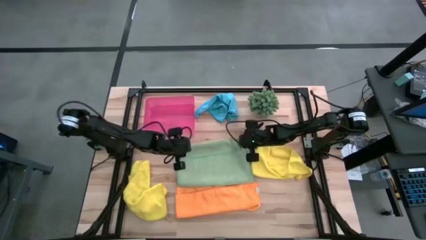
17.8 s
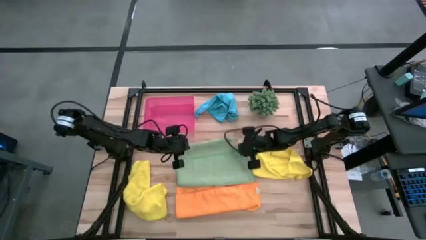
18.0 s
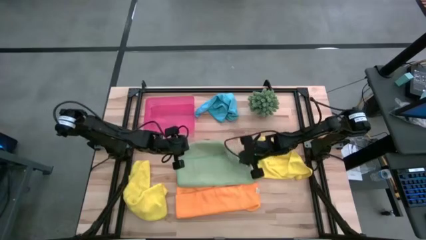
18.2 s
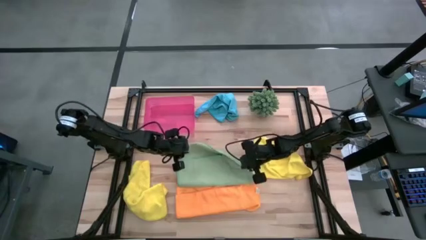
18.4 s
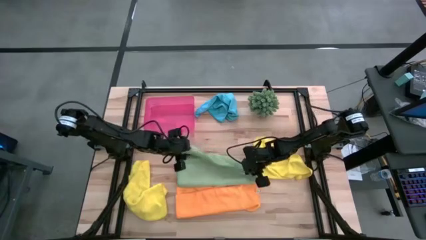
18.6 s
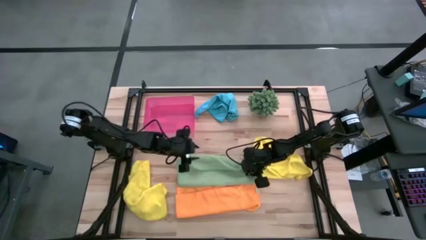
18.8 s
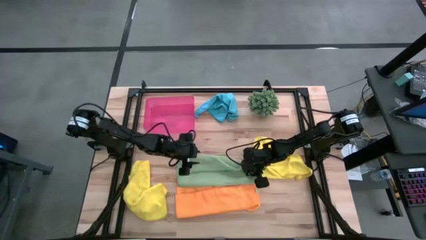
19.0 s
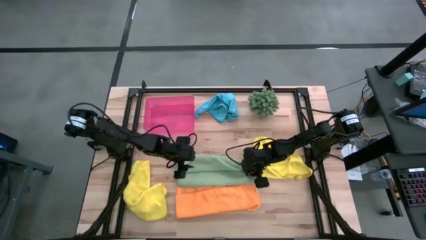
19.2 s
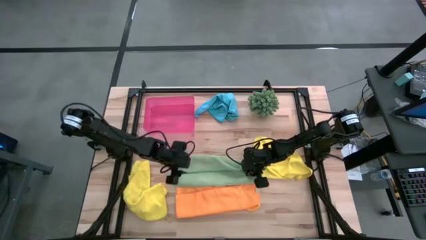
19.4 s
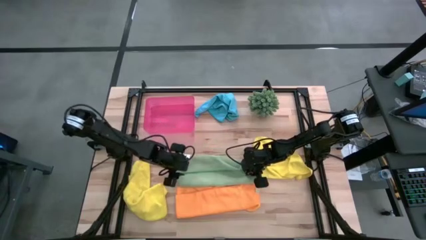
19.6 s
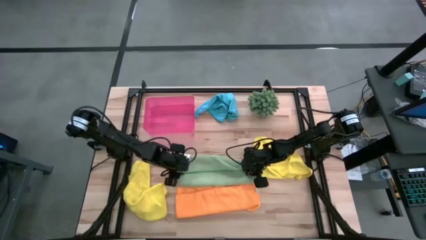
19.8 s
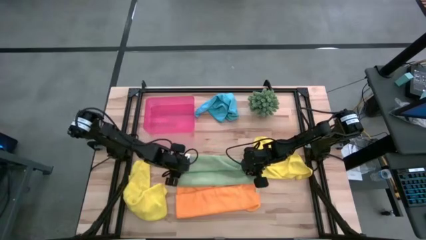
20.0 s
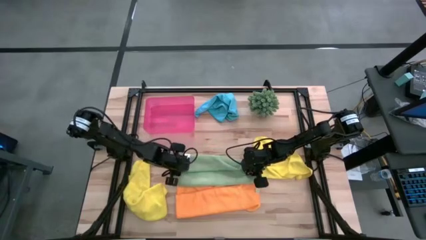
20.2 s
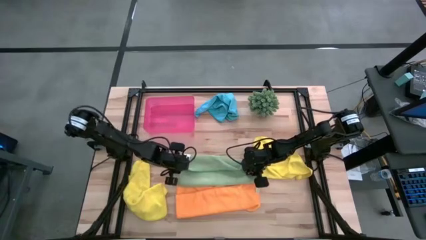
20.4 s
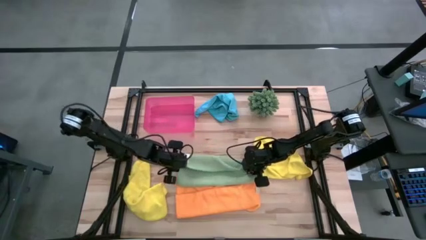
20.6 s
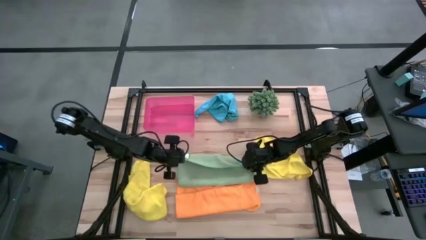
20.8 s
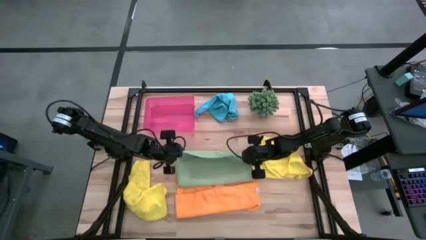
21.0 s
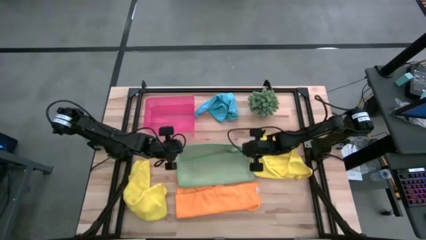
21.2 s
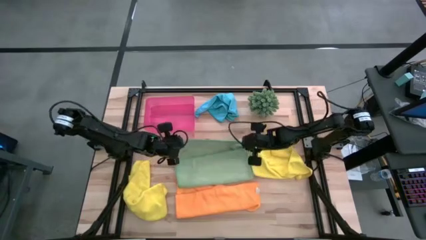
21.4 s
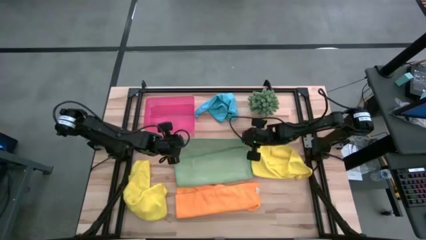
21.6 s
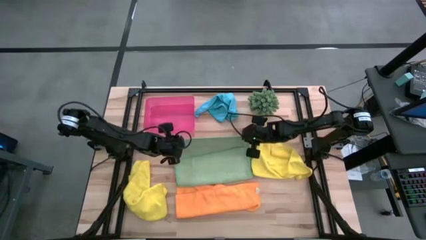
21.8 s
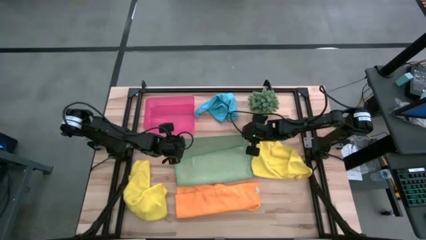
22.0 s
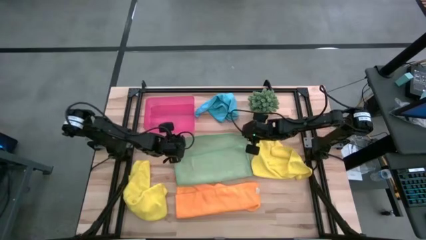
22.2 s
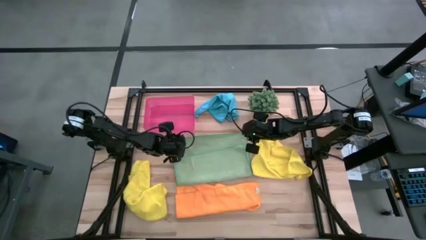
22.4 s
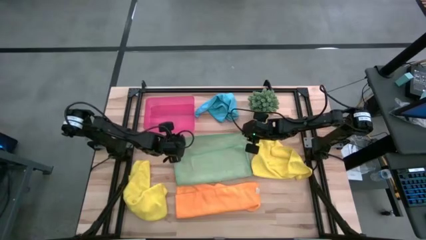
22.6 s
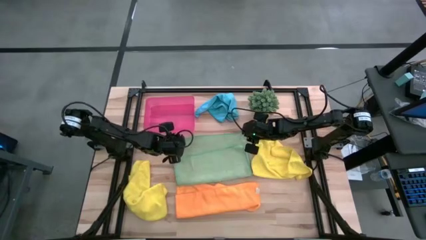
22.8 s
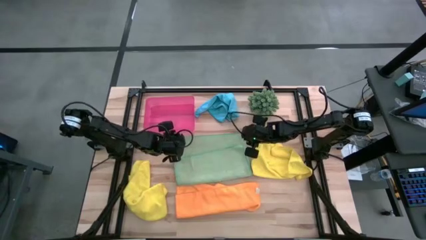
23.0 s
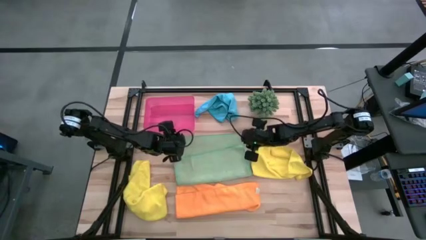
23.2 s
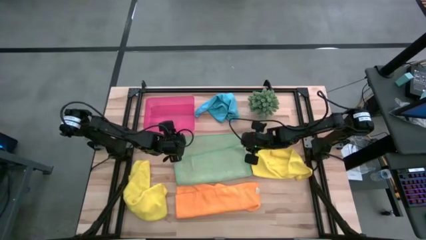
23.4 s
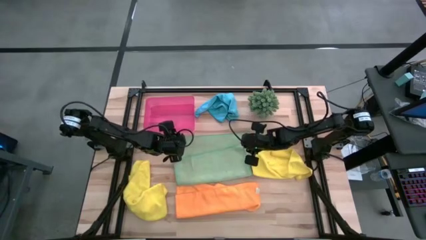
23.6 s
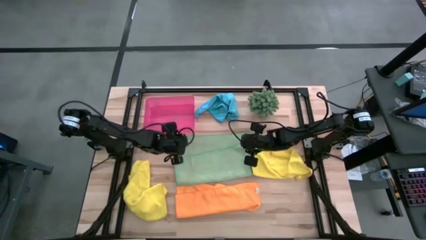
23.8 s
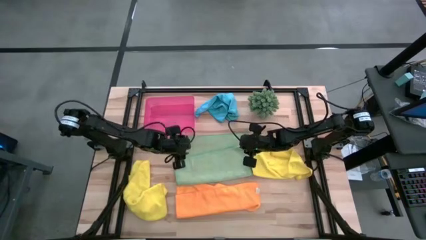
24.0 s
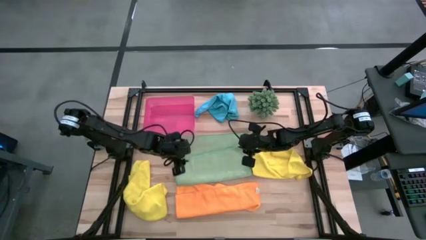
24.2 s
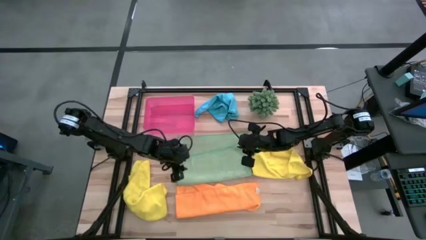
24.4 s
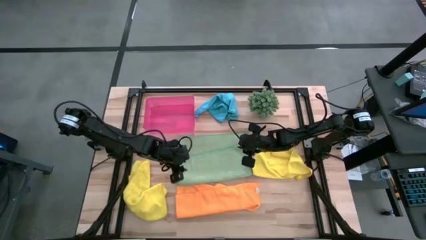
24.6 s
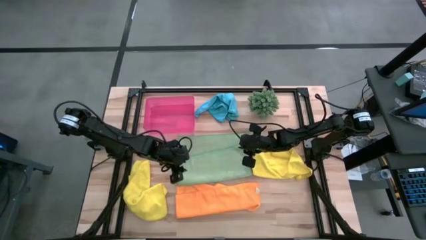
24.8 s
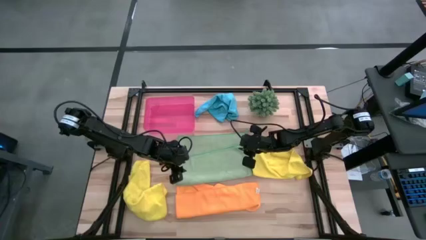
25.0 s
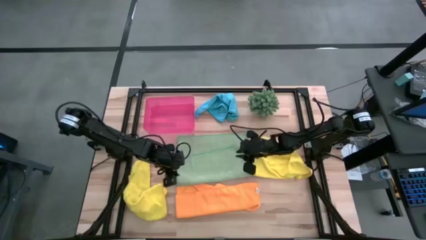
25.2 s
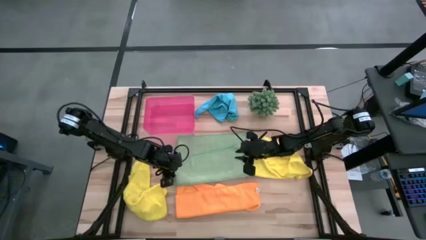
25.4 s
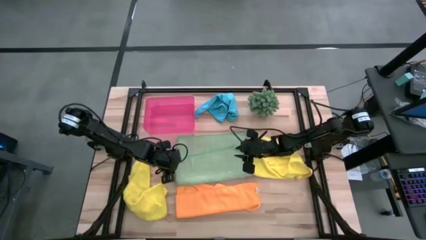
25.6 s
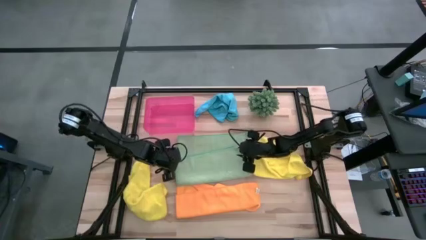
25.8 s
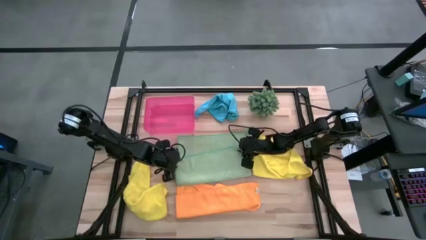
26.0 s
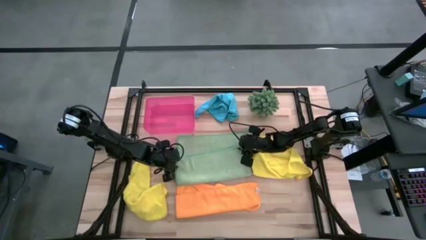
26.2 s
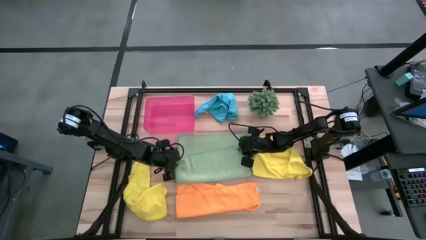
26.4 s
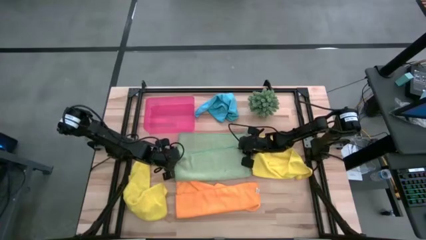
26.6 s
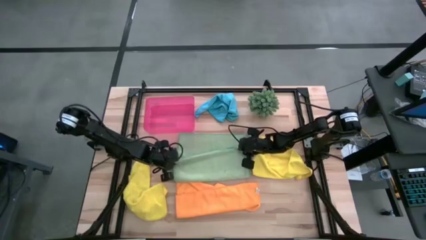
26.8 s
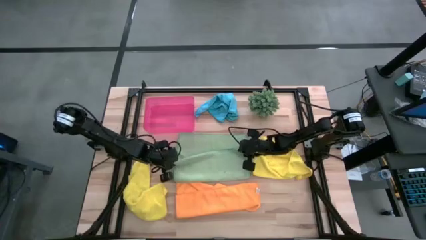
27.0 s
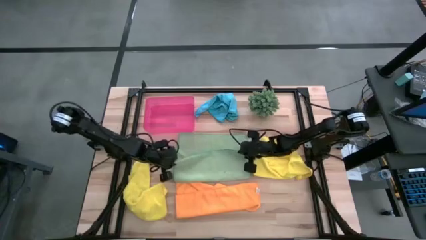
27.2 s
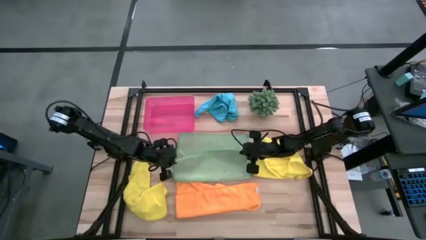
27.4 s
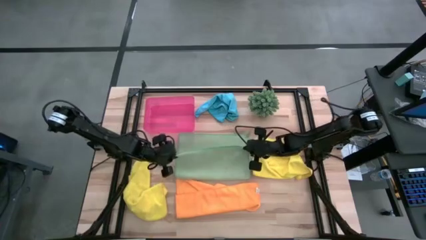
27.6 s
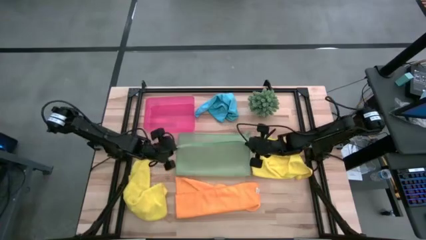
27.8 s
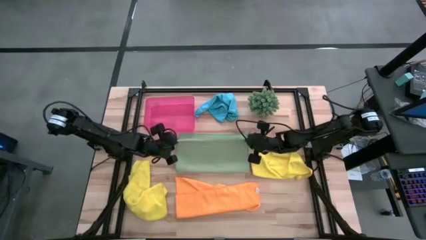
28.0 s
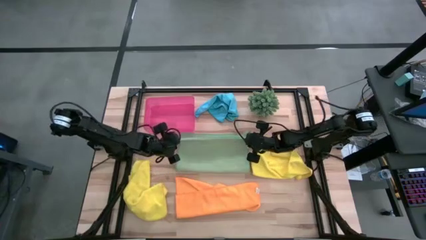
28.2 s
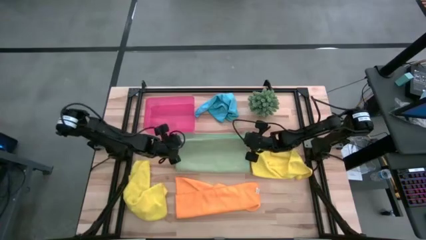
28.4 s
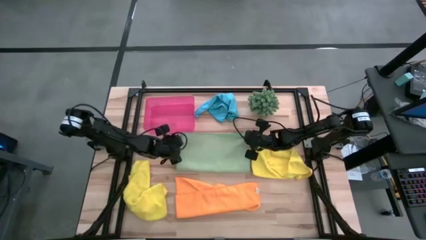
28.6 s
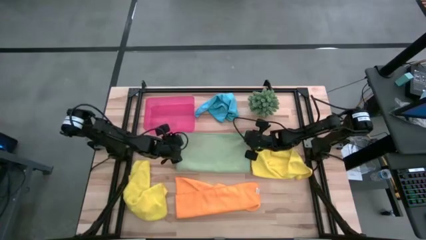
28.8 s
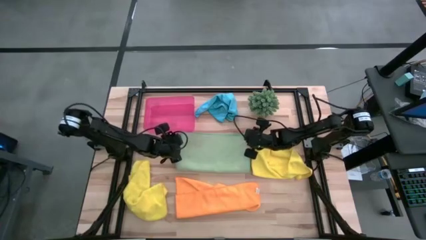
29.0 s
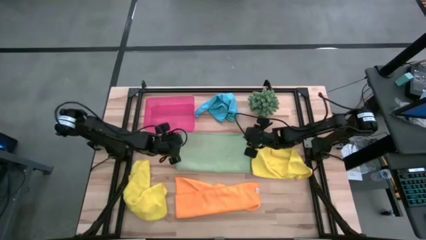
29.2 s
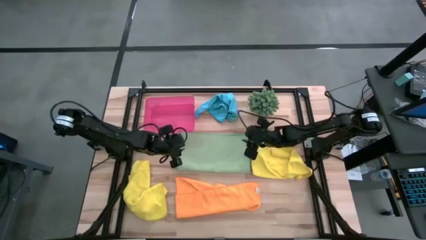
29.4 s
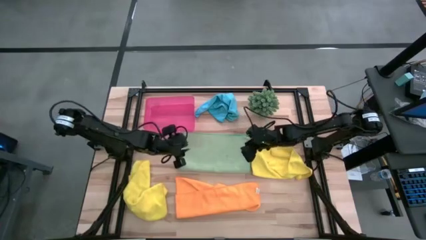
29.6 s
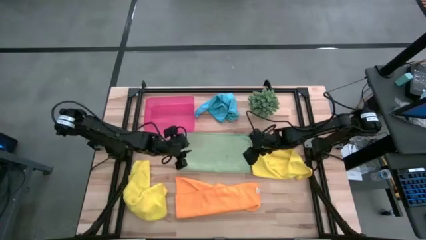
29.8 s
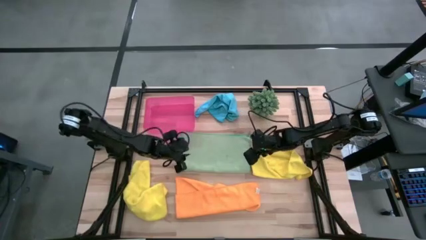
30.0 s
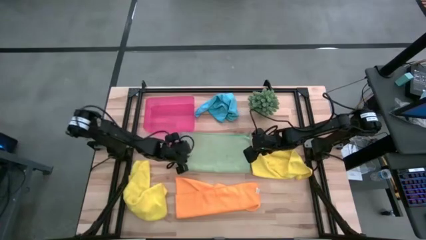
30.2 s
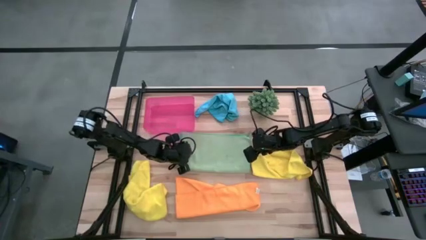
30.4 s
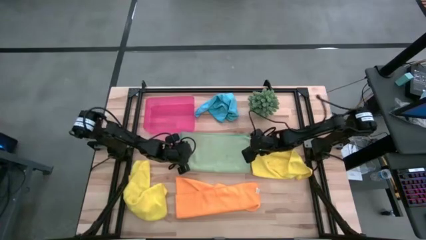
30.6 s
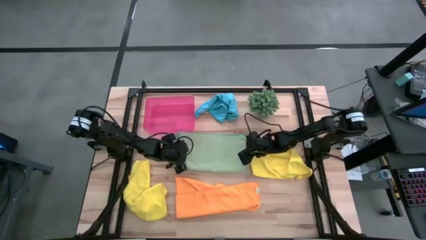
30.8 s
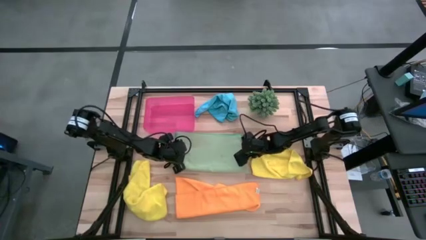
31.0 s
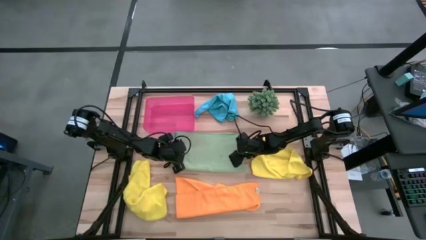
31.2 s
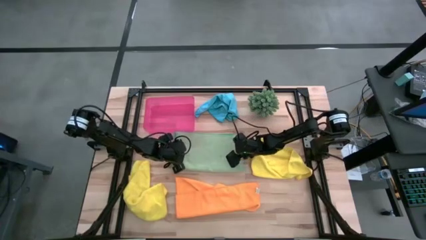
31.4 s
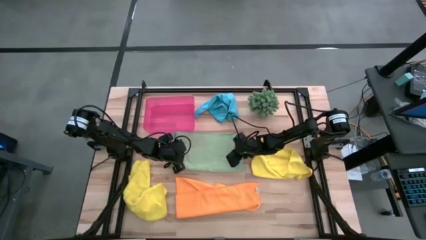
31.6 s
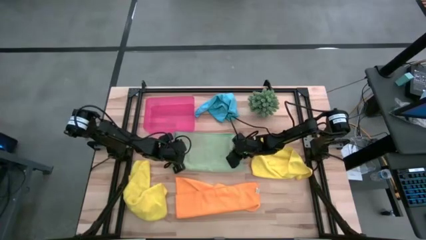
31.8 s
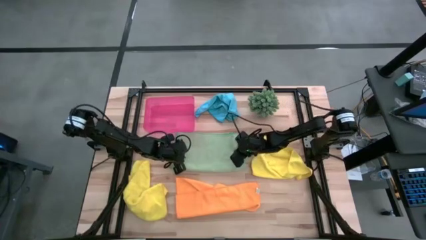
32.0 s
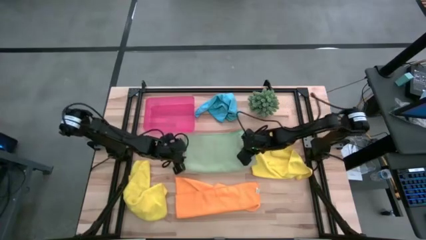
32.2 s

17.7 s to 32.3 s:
Task: Fold microfiber towels
Fold the green towel
